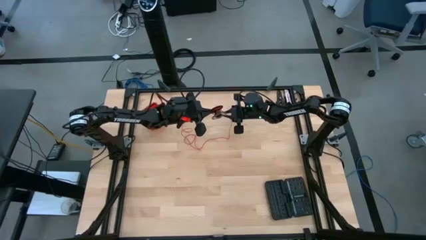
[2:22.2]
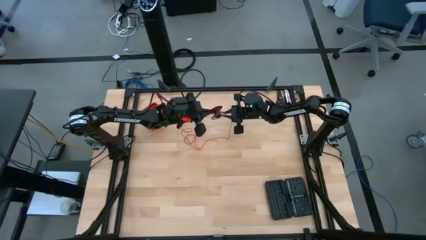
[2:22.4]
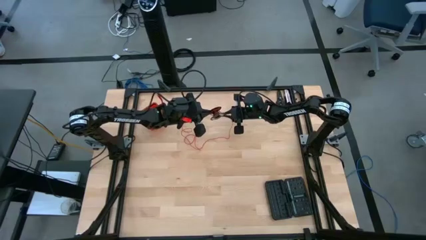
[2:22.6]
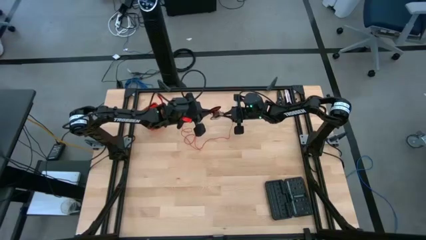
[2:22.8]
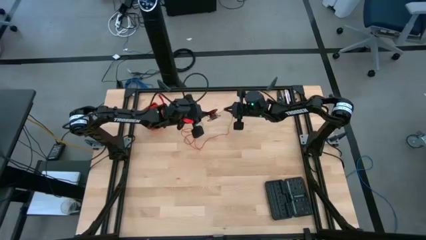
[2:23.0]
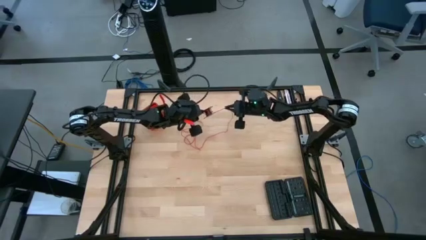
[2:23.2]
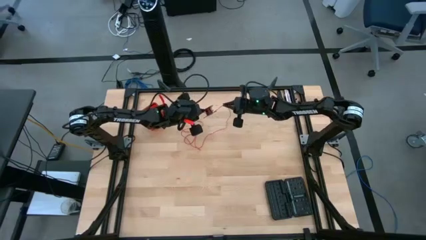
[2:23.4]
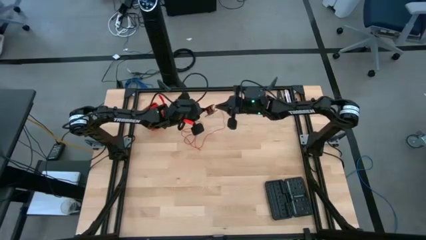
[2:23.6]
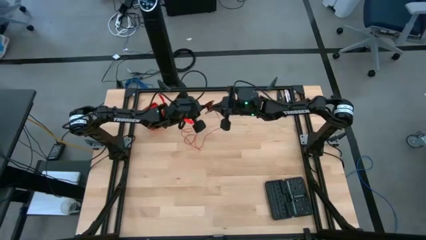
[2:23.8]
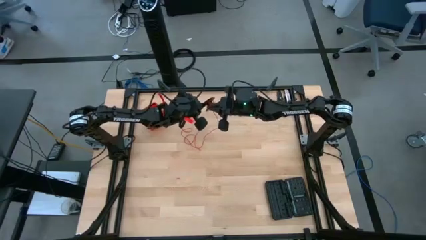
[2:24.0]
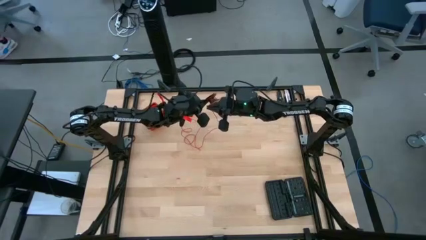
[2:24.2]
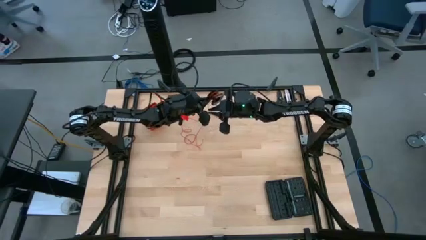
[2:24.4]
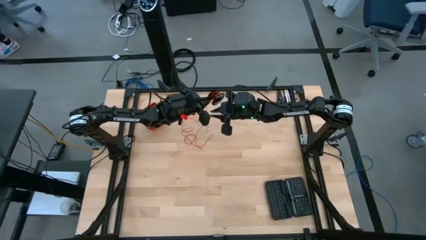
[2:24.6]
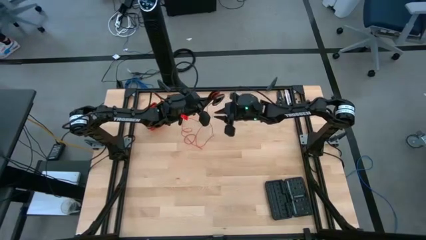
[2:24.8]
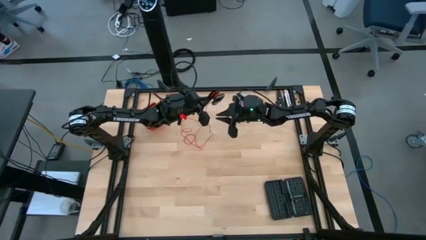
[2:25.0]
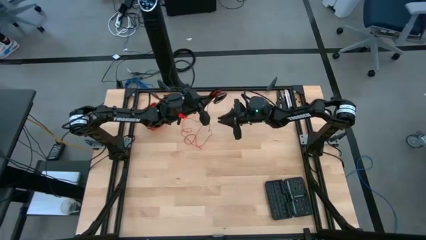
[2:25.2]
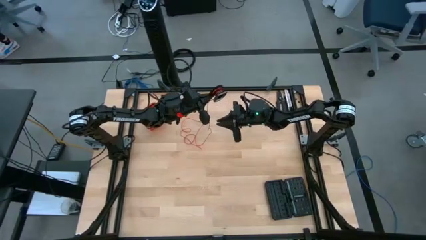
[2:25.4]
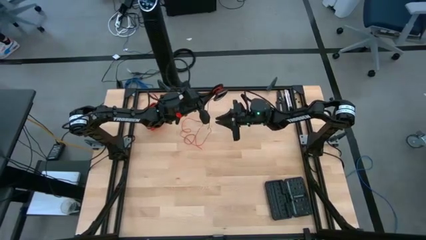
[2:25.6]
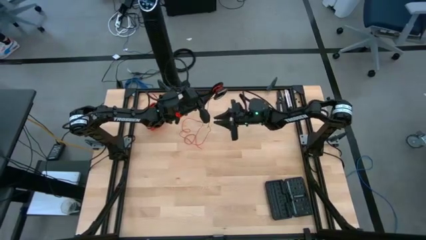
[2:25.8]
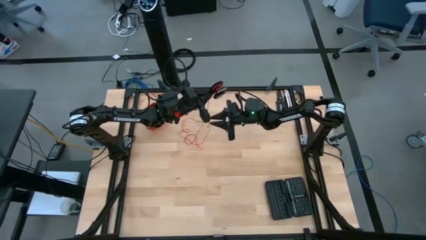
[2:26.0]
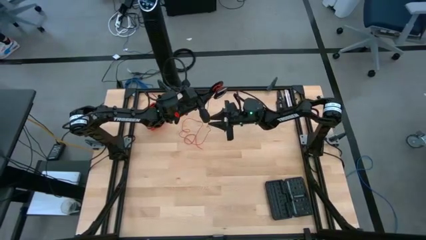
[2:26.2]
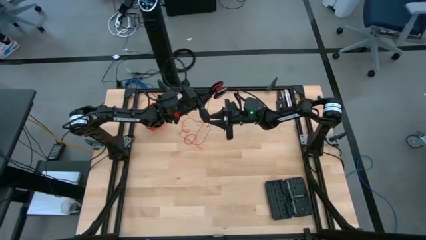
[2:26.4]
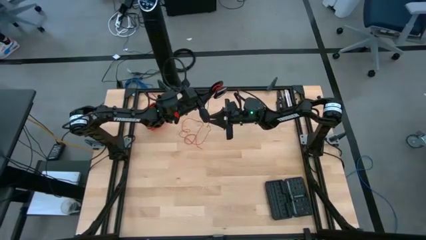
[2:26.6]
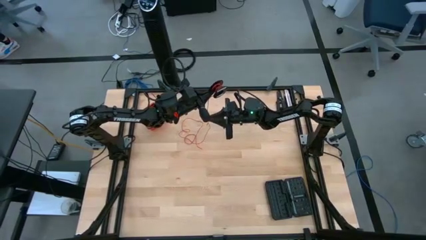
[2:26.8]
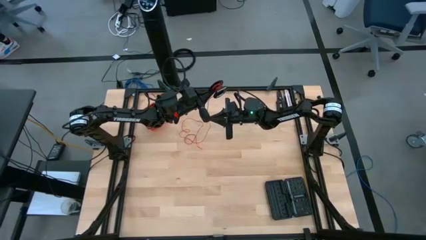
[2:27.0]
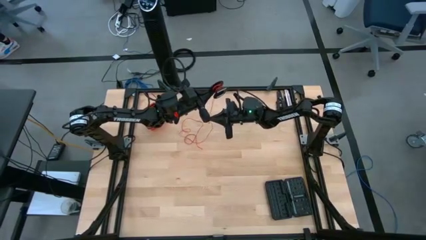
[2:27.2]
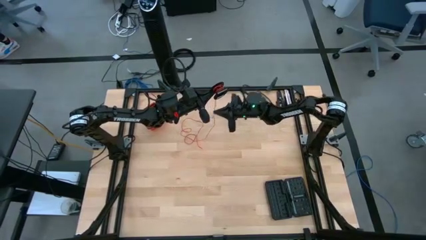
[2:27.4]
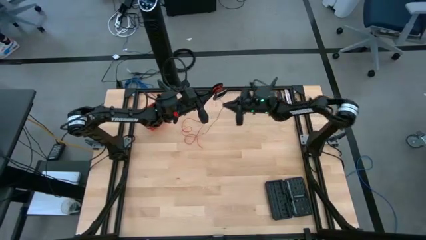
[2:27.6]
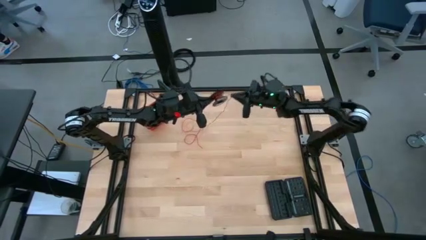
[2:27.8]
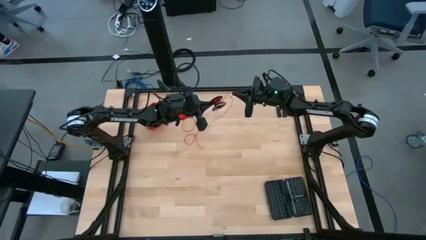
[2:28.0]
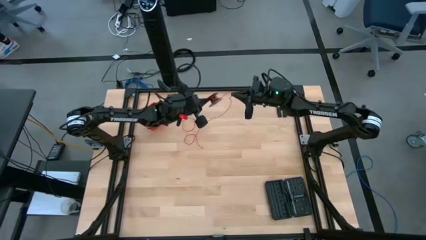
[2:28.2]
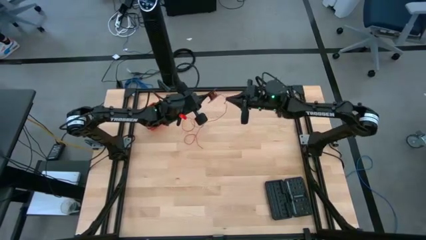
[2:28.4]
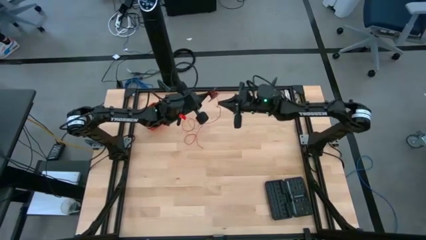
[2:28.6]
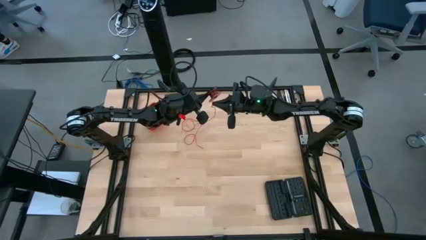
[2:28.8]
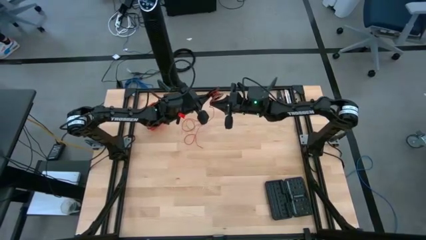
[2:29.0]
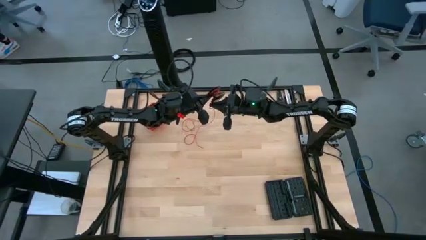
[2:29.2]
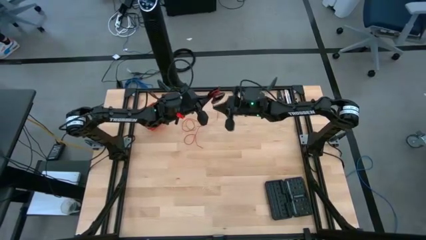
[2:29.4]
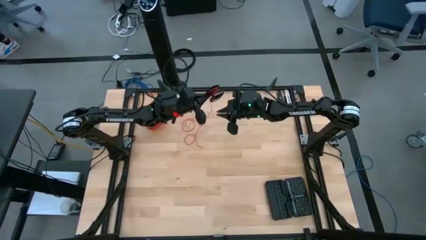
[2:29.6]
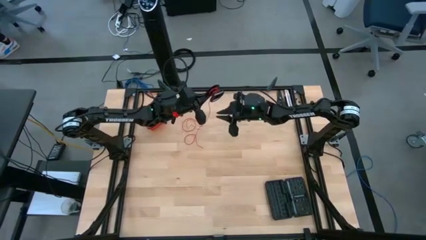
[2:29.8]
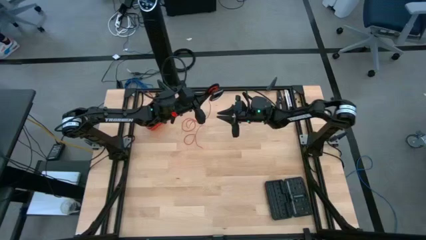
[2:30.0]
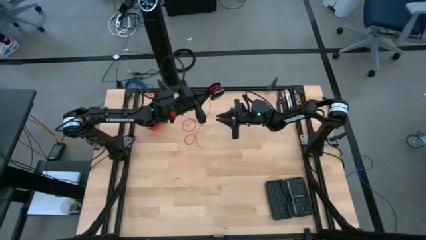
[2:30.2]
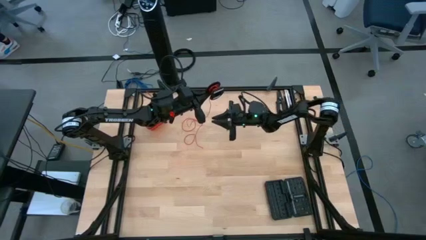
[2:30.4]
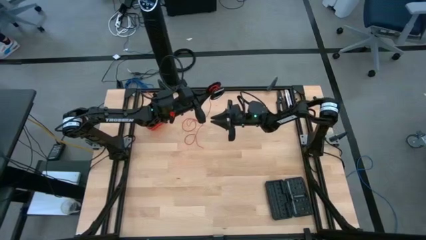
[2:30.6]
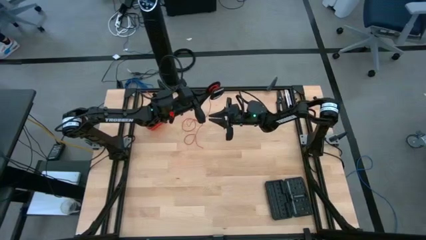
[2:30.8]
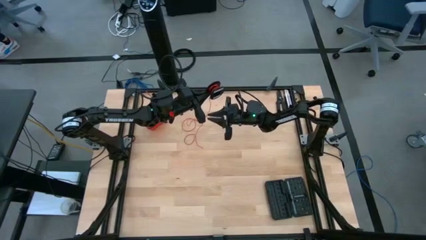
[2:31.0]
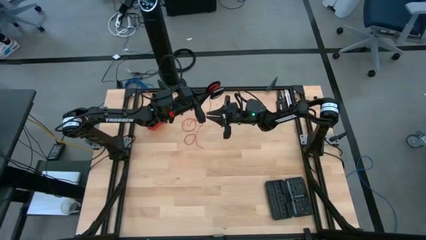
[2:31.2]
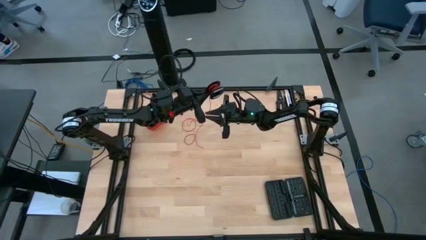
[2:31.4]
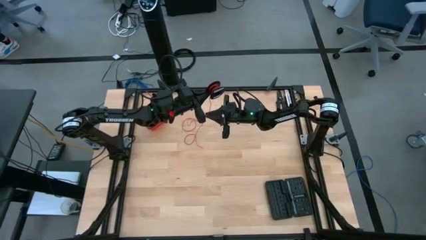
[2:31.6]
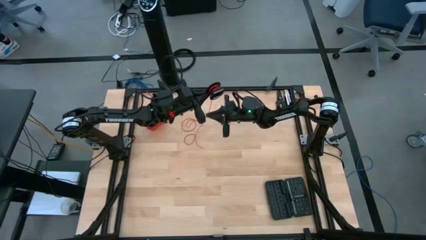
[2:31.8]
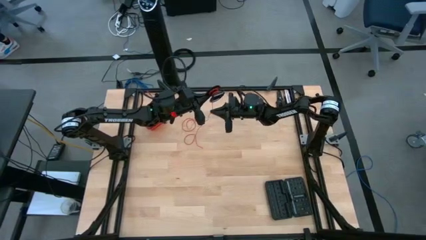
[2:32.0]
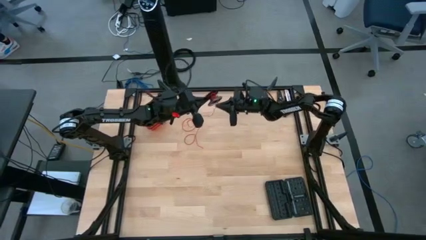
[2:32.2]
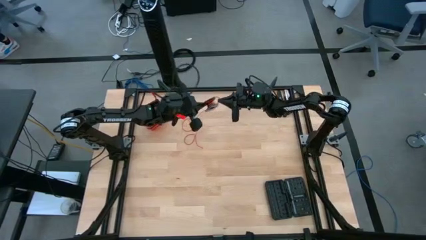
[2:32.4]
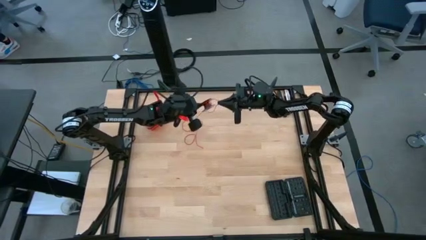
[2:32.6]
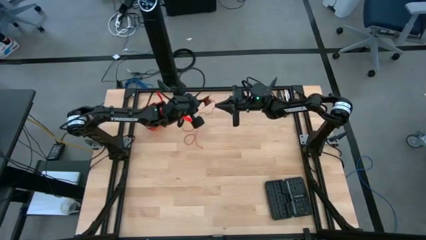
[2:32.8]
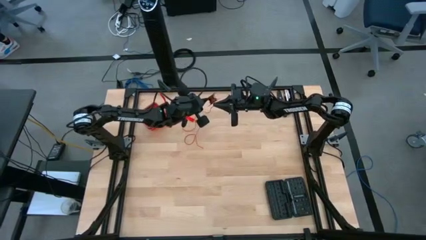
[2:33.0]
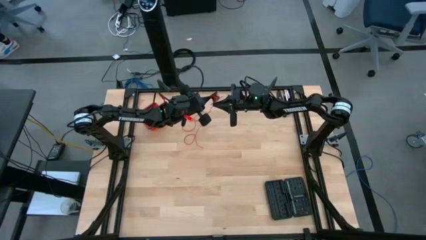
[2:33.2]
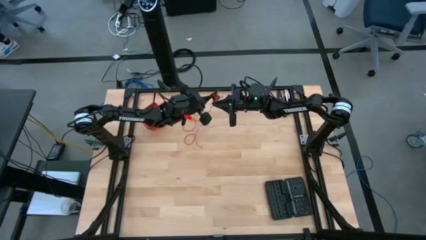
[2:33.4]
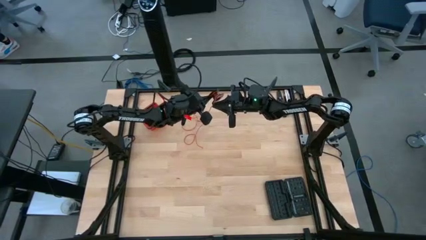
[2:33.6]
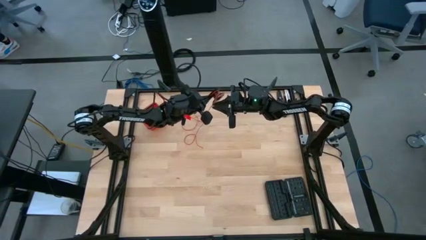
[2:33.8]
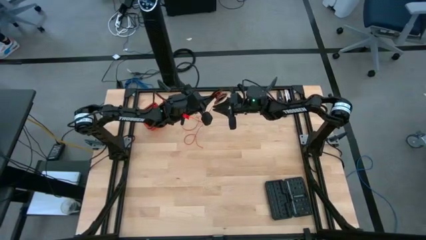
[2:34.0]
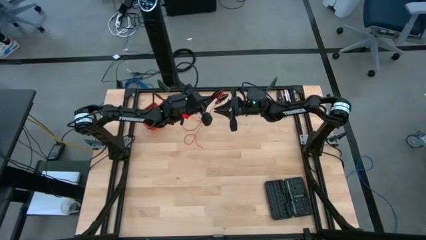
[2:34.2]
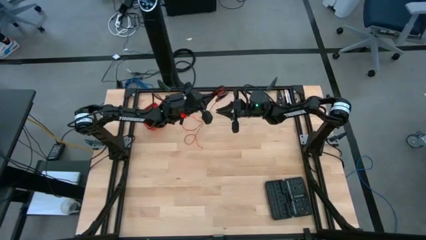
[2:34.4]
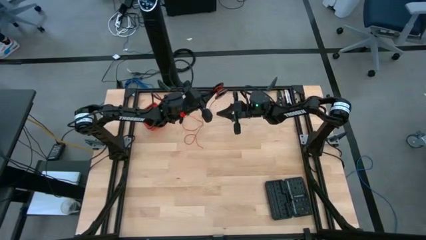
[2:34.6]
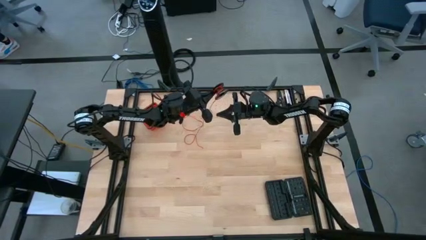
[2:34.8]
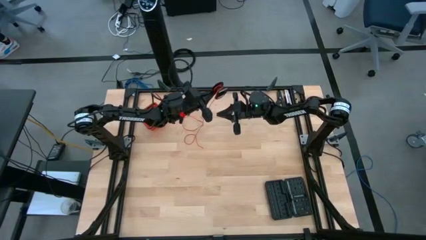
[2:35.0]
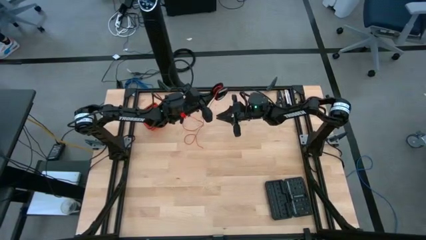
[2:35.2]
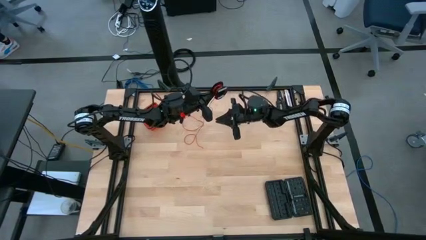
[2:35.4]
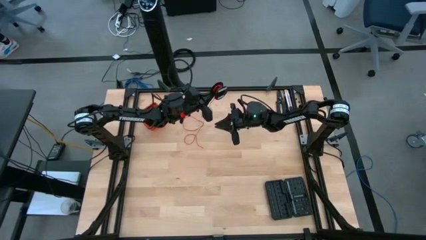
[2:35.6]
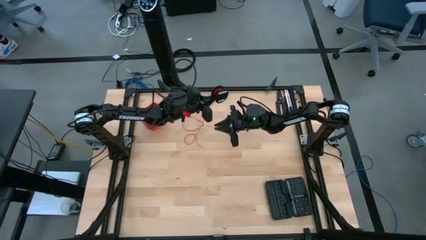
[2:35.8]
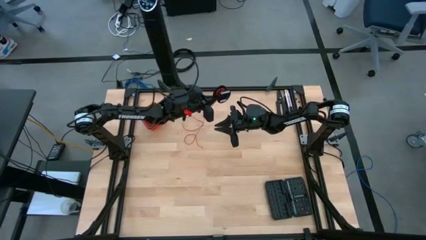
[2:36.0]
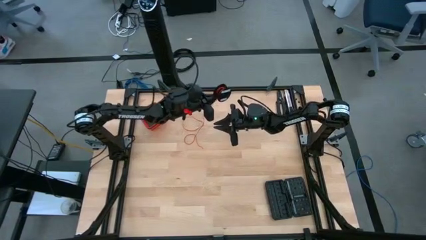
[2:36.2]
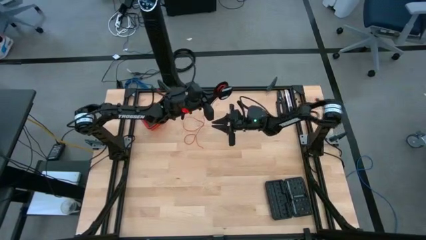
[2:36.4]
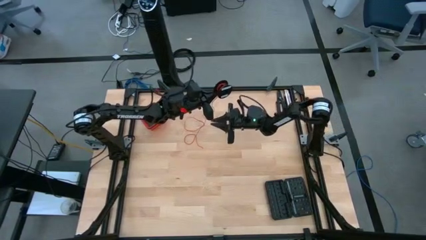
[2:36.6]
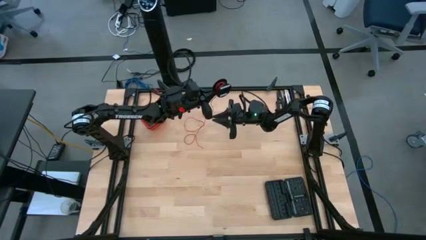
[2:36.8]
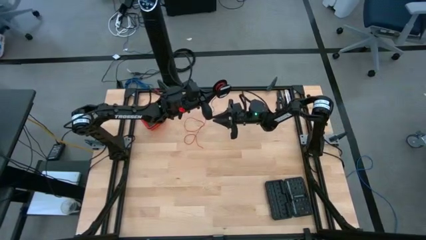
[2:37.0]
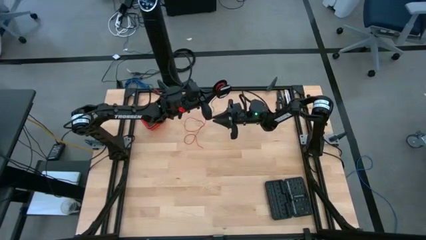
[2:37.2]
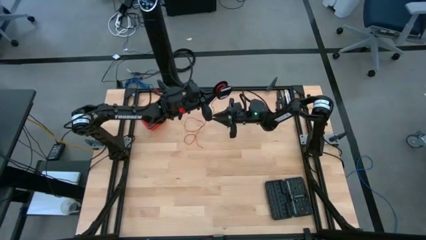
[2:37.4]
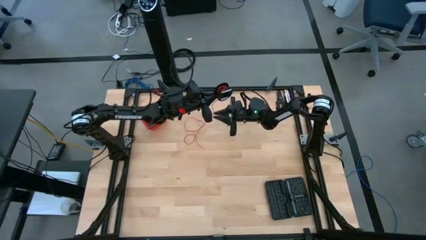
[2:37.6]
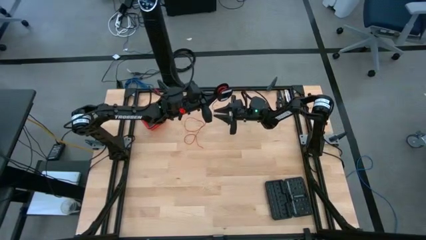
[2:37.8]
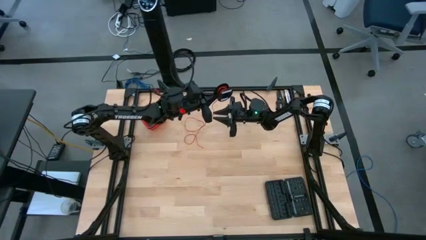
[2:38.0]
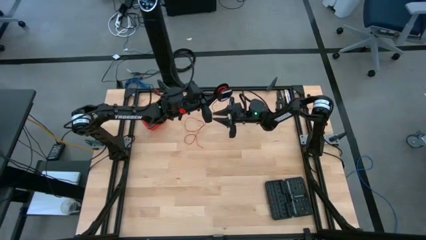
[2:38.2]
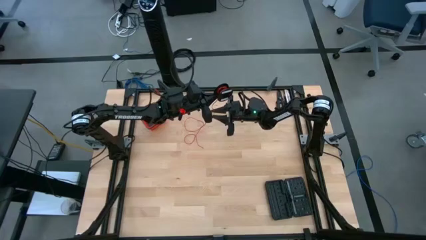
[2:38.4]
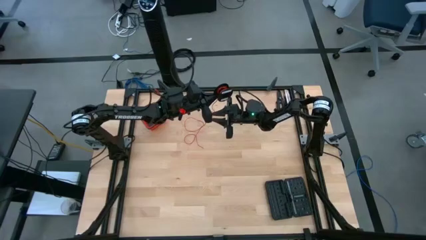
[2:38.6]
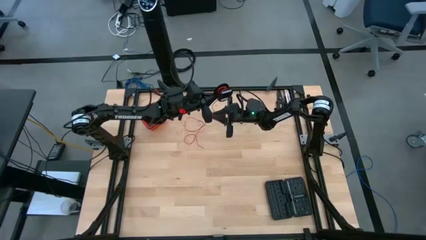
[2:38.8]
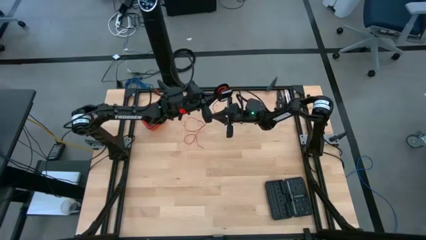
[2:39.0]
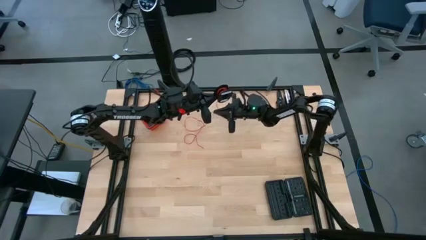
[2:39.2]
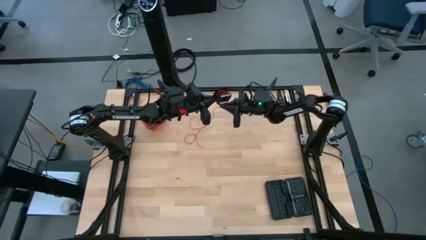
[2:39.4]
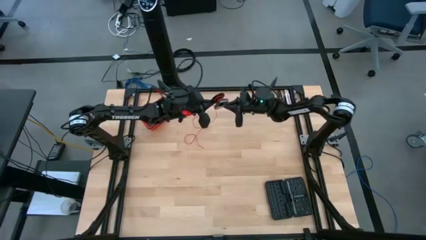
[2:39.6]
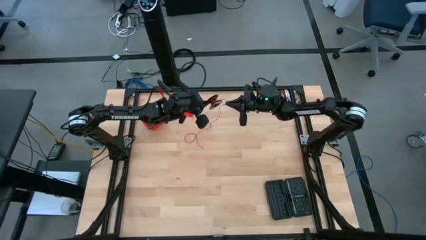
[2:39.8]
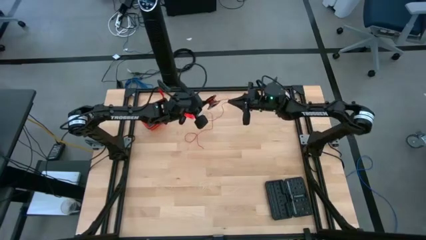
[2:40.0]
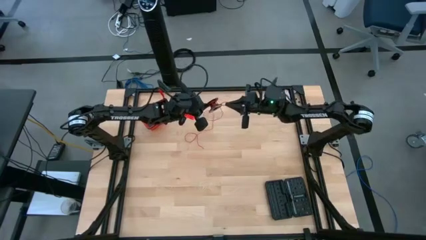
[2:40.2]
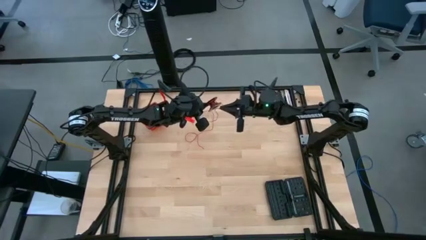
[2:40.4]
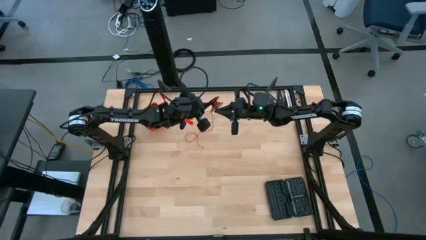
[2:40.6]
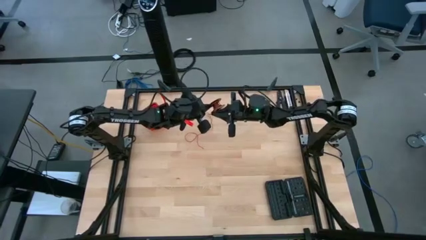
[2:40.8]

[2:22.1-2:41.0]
Task: Coil cords
Coil the wire to the spool
